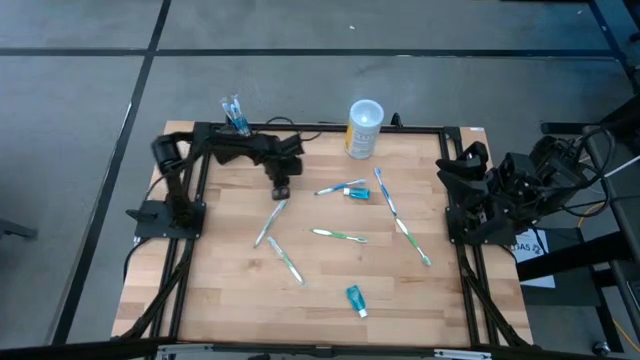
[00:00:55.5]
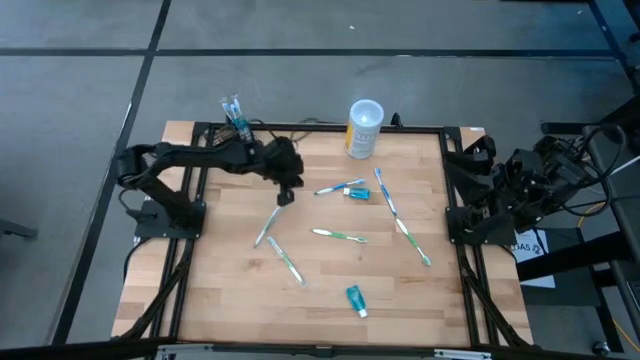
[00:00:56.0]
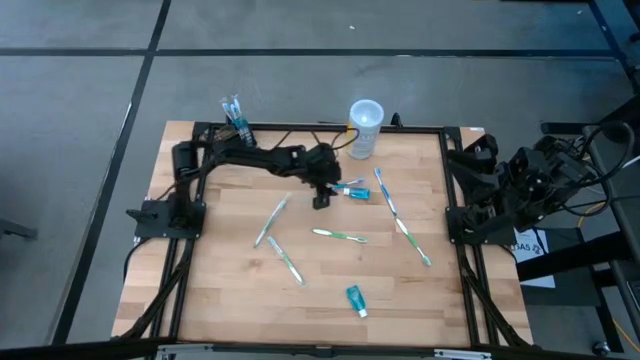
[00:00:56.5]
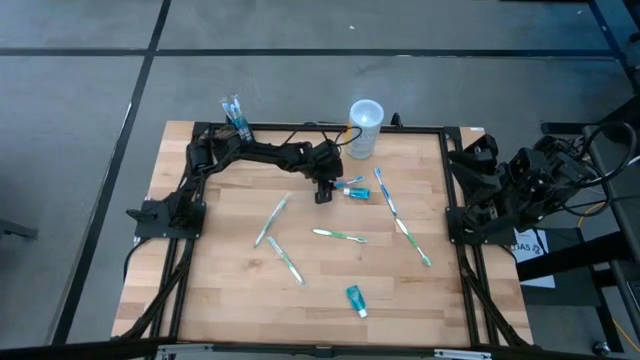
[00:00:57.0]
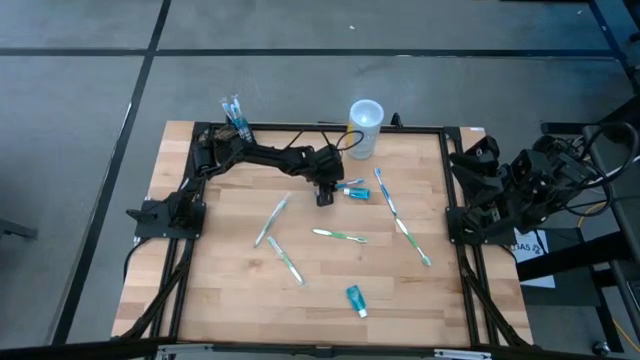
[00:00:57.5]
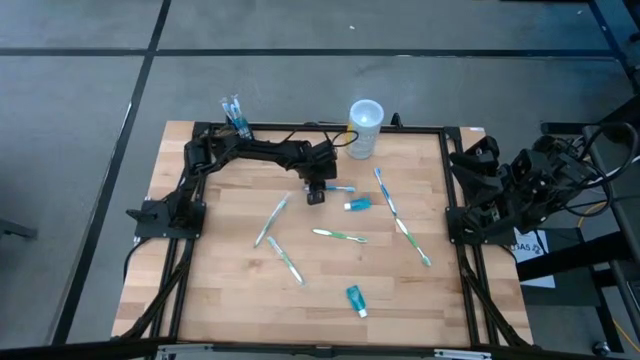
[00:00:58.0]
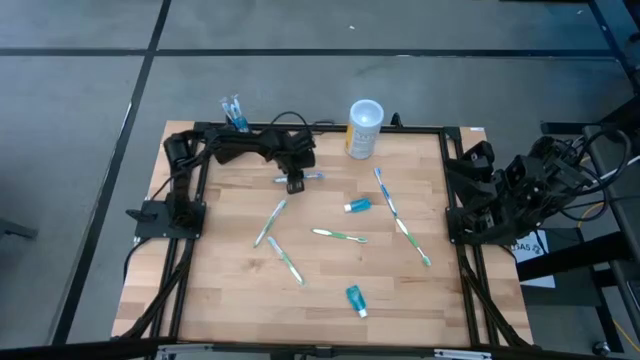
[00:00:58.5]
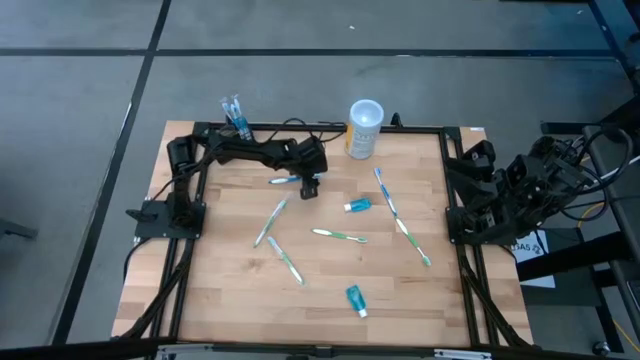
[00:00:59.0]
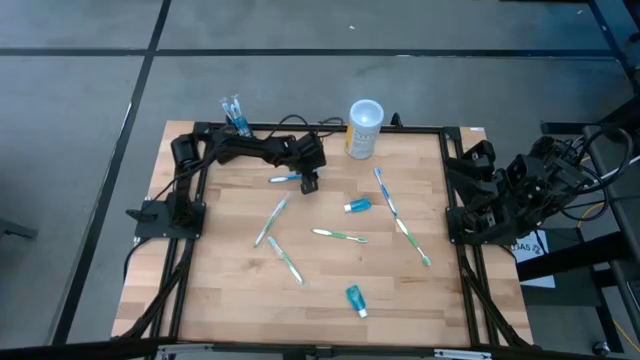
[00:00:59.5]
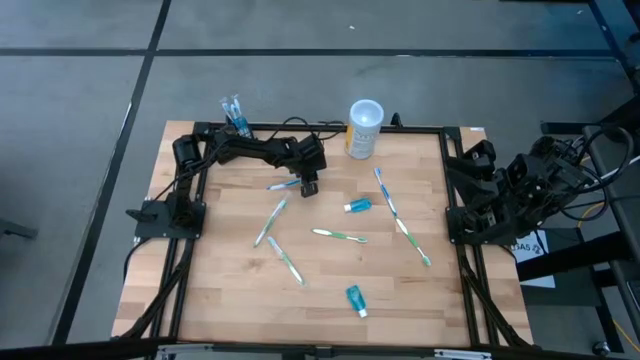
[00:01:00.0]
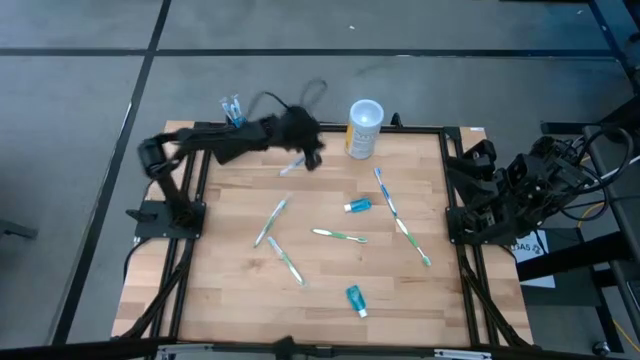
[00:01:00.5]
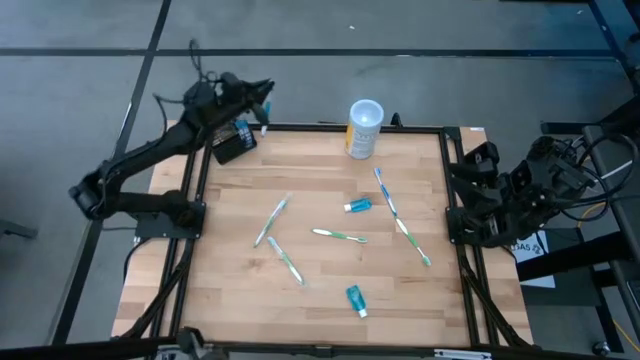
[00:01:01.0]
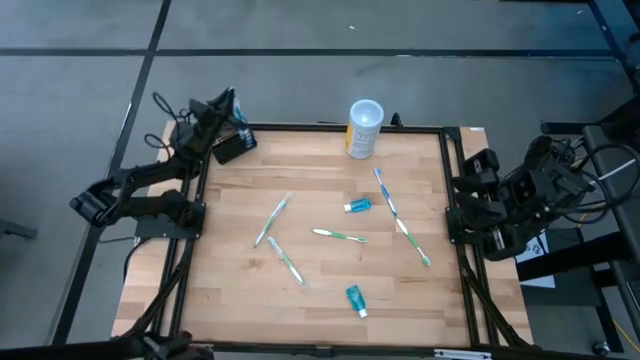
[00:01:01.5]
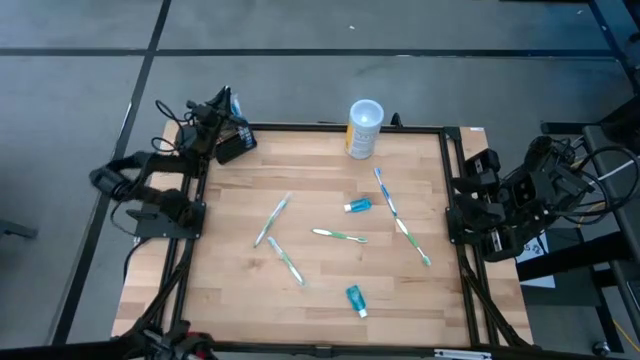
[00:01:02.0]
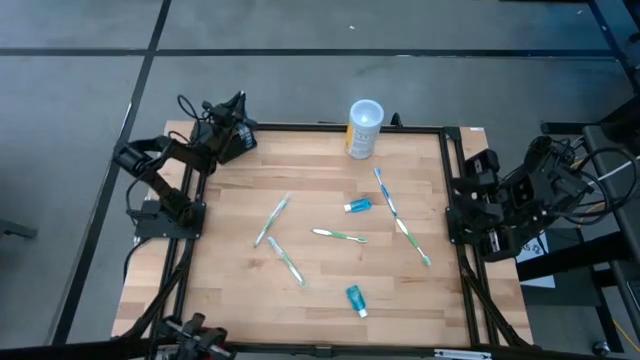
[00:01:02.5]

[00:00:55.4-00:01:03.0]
Task: Pick & Place toothbrushing station
Put the blue toothbrush into the right section of the black organizer

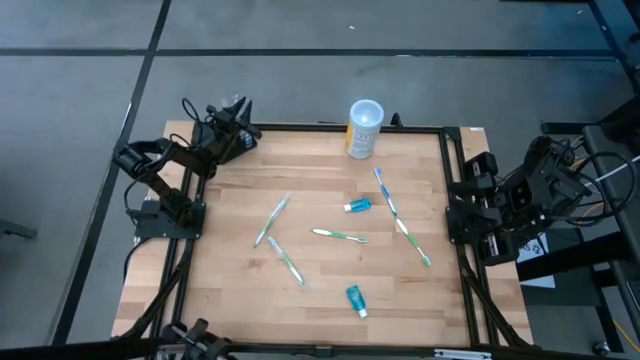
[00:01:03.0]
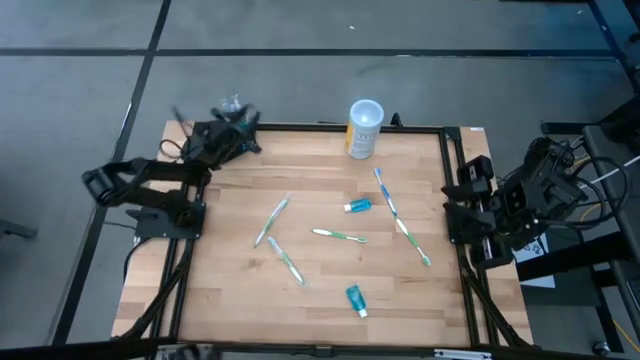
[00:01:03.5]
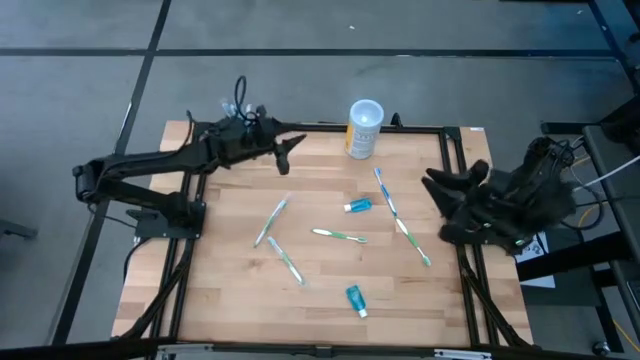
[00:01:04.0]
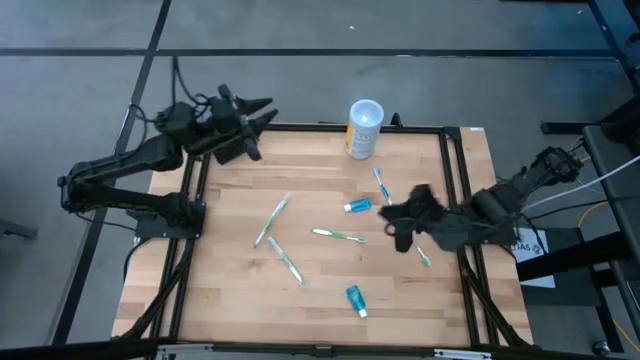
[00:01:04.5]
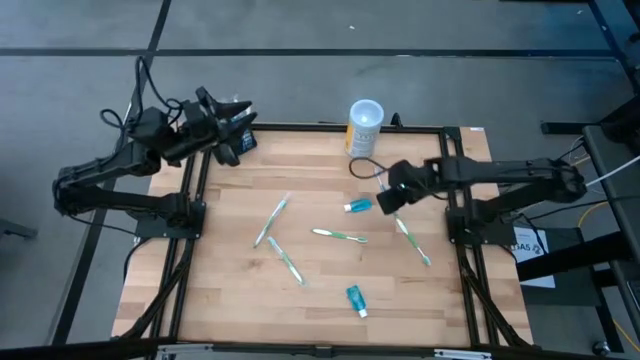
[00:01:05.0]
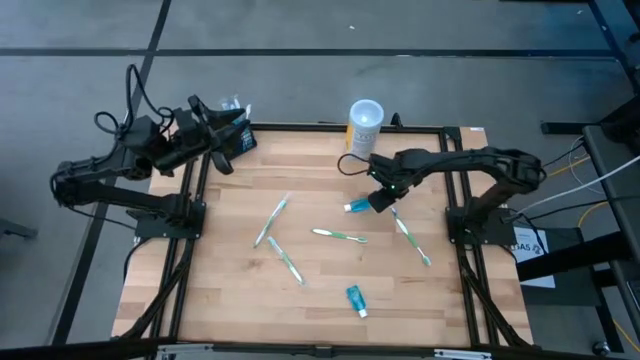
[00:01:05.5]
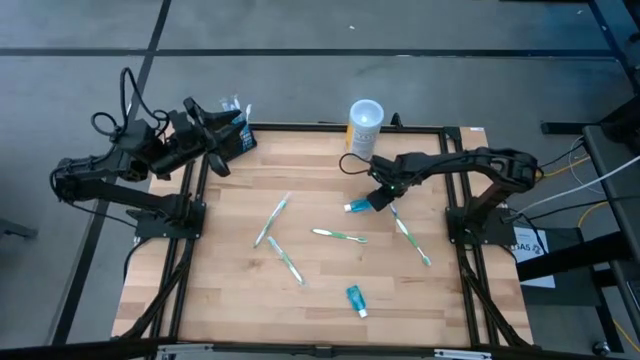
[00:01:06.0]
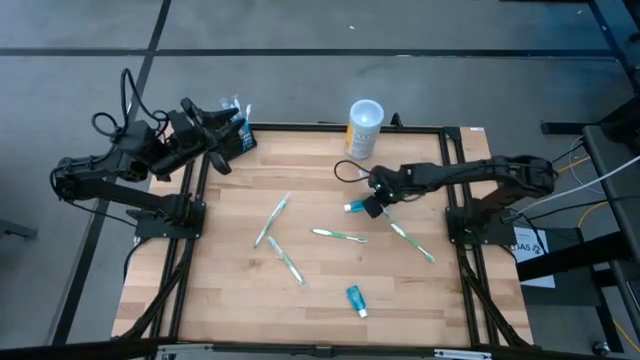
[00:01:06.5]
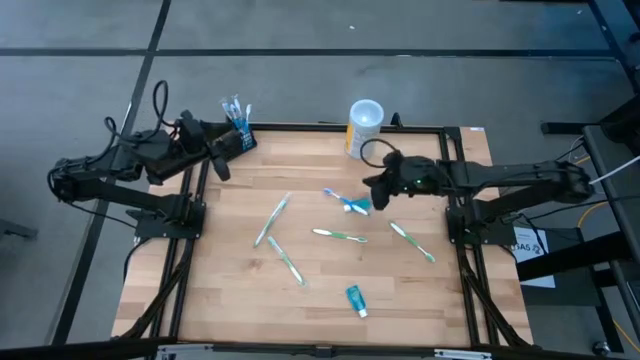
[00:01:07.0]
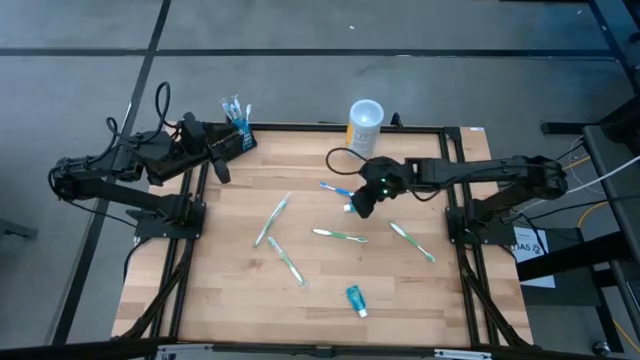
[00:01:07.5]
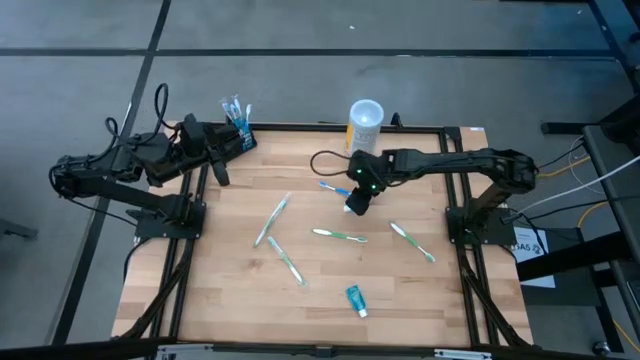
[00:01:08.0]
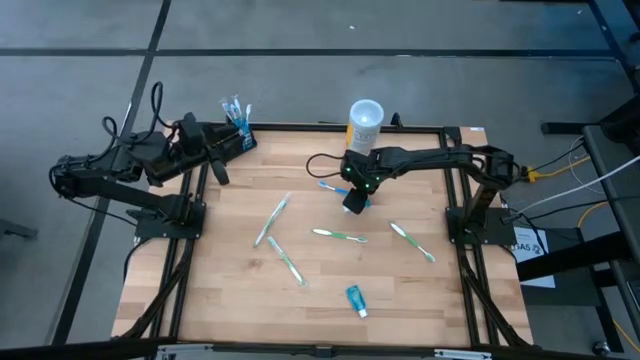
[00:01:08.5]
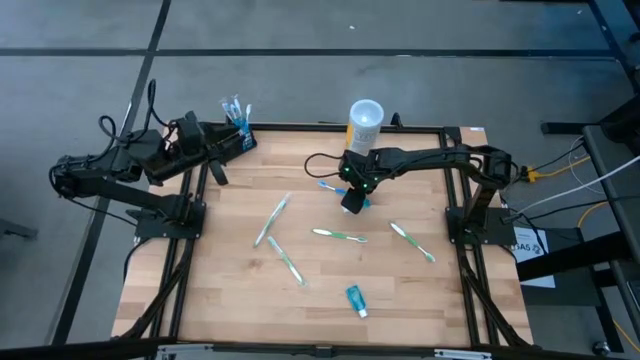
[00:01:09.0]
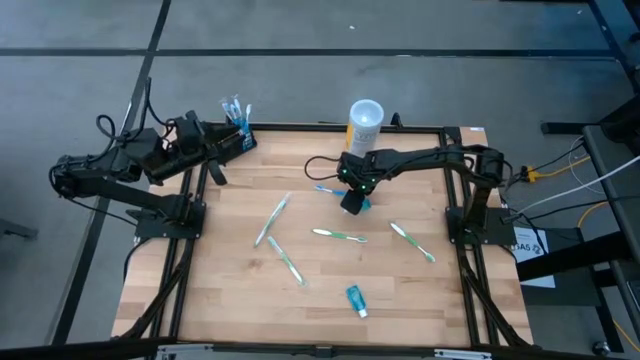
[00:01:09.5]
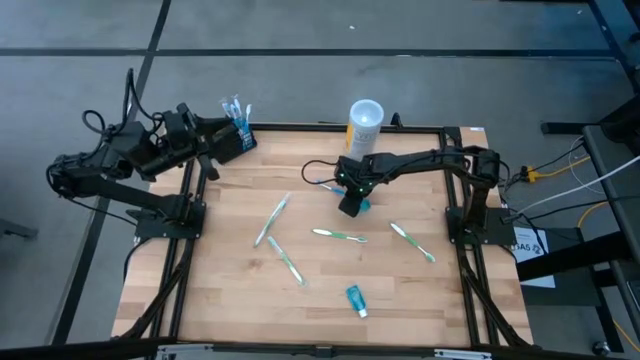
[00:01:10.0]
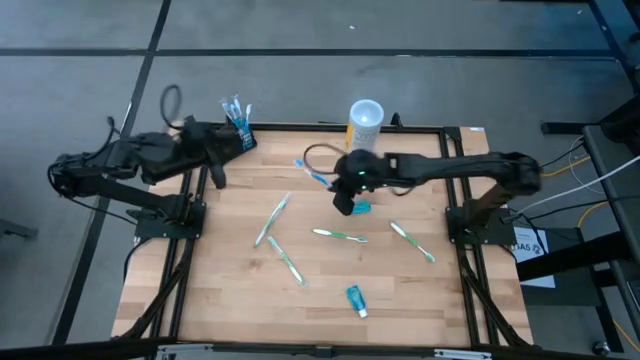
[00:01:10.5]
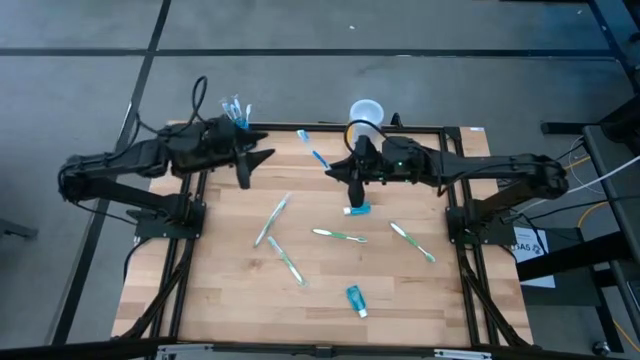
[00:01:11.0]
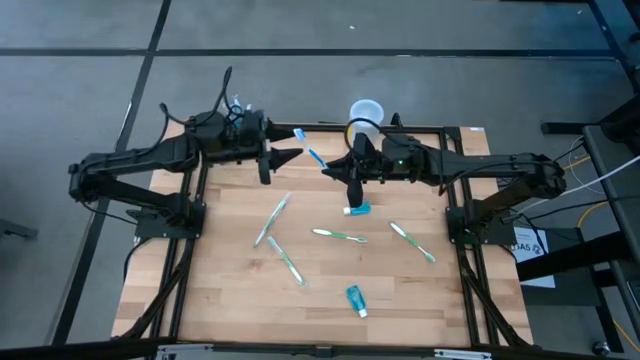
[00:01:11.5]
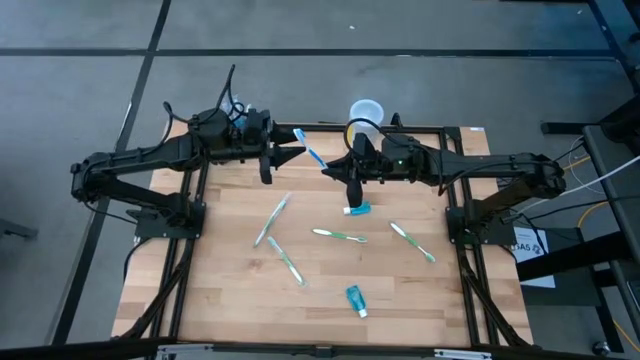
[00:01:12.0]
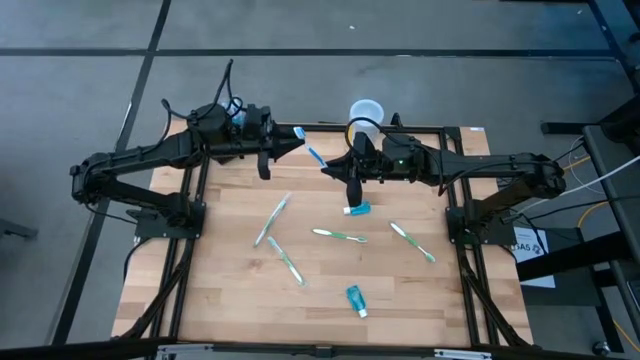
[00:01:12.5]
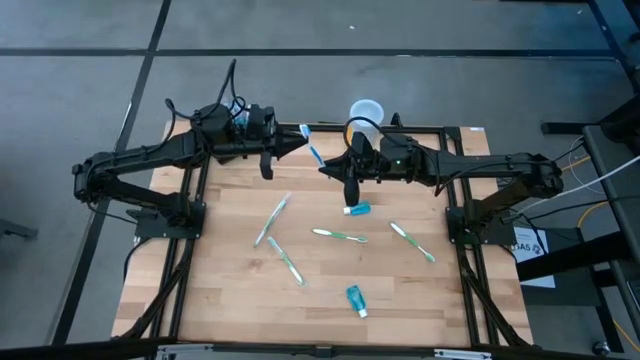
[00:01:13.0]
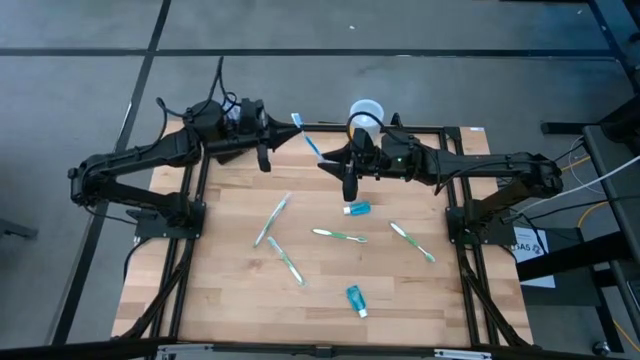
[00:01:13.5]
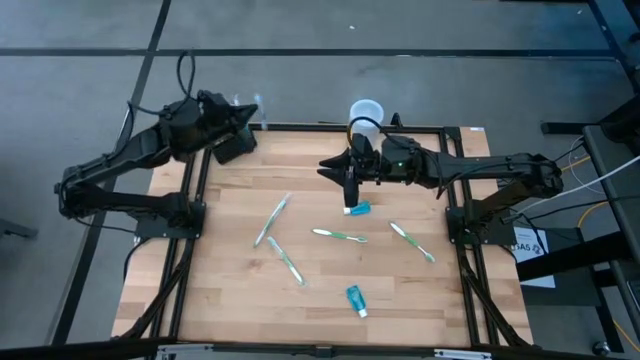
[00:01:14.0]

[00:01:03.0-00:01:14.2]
Put the blue toothbrush into the right section of the black organizer

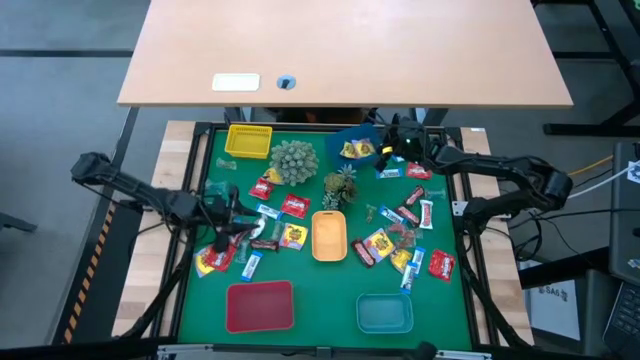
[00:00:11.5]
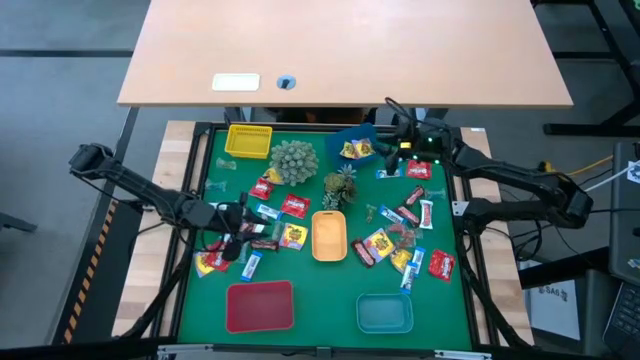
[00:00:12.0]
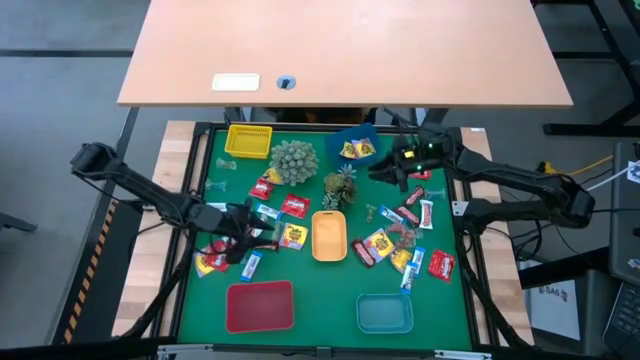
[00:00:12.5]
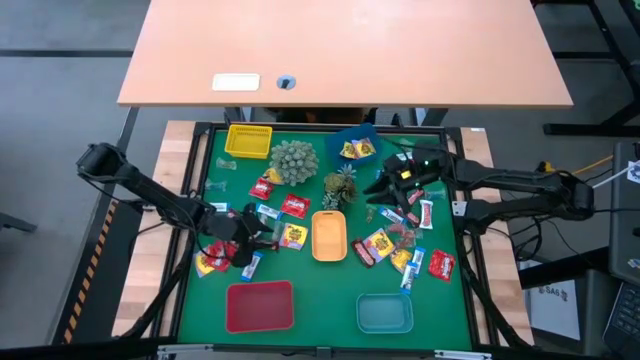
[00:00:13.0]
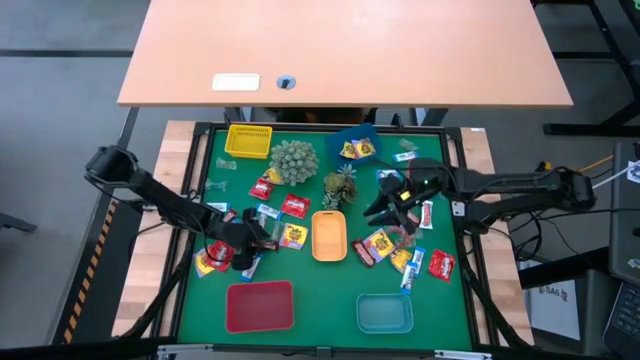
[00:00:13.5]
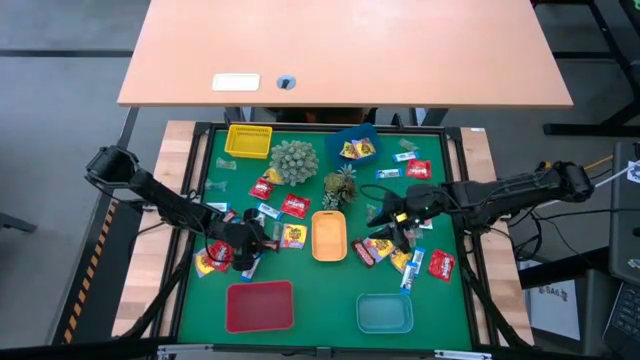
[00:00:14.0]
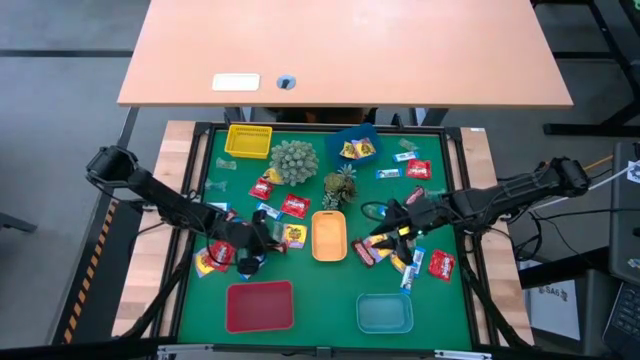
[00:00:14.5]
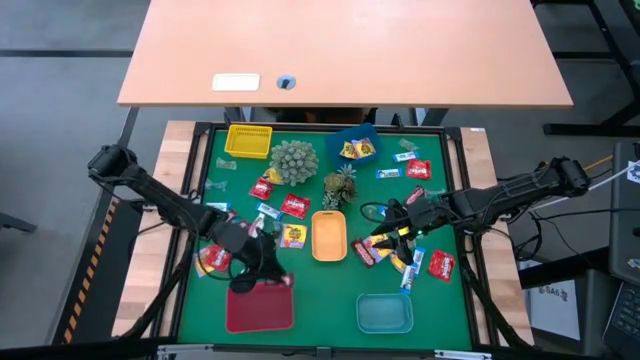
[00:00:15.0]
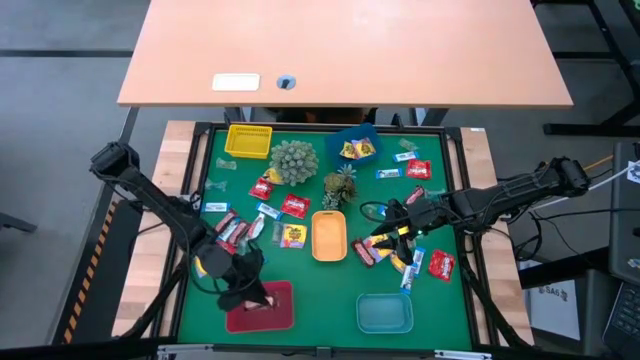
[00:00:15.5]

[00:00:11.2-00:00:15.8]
Task: Sort candy
Put the brown chocolate bar into the red bin
